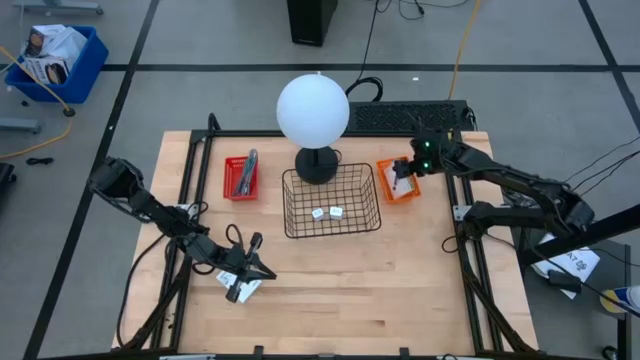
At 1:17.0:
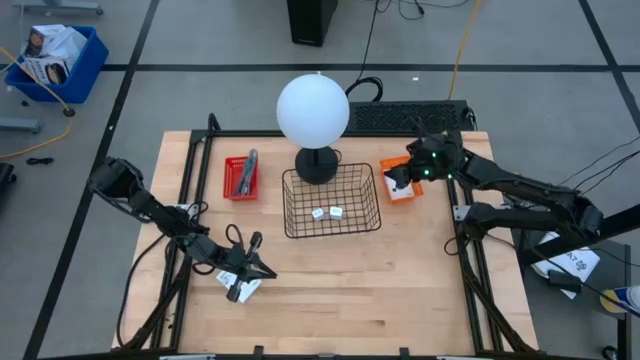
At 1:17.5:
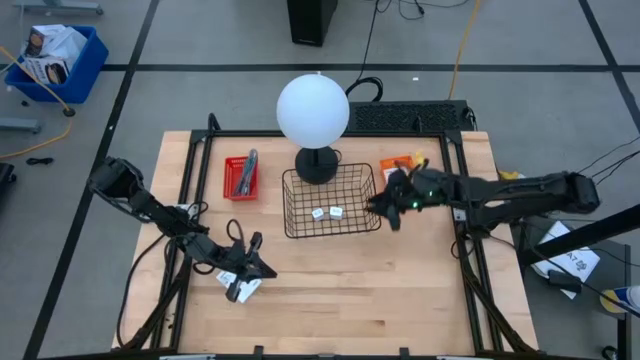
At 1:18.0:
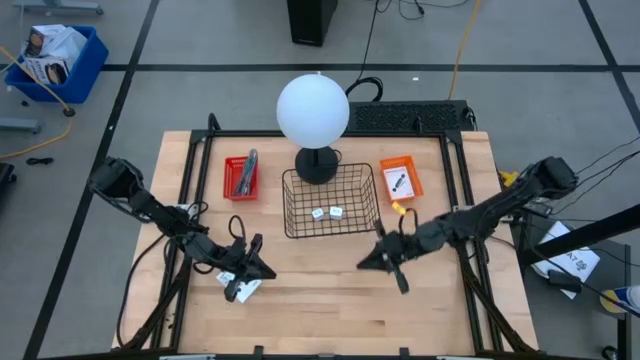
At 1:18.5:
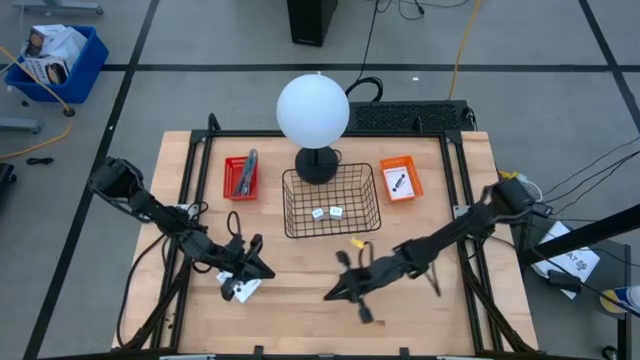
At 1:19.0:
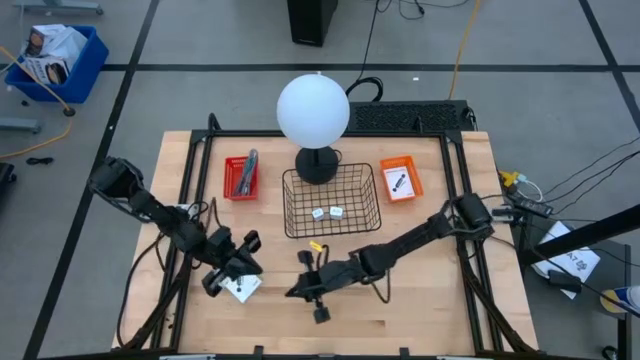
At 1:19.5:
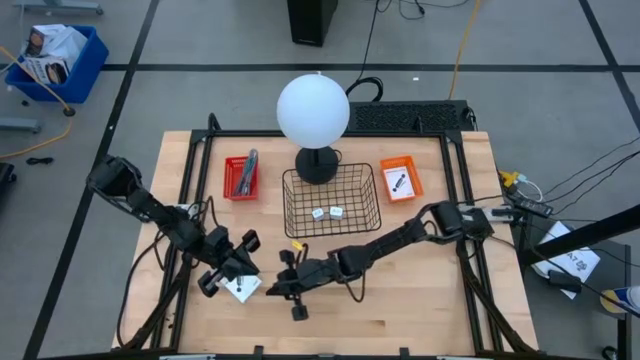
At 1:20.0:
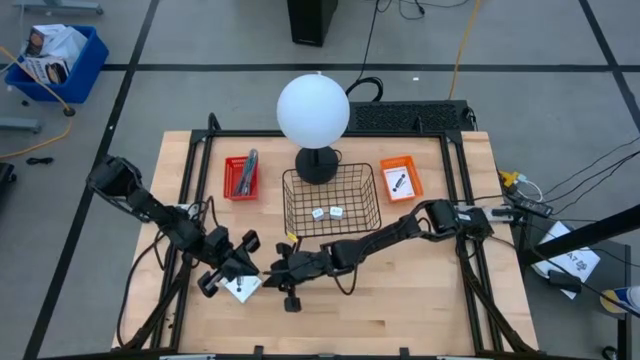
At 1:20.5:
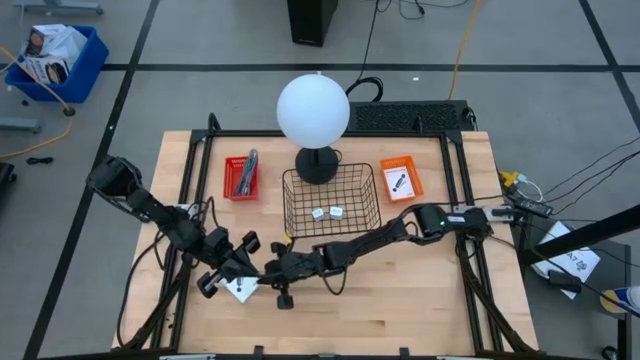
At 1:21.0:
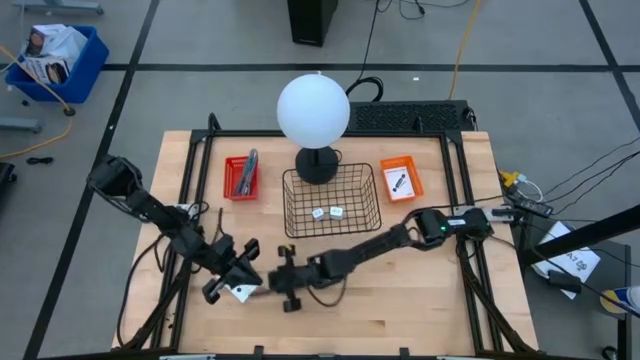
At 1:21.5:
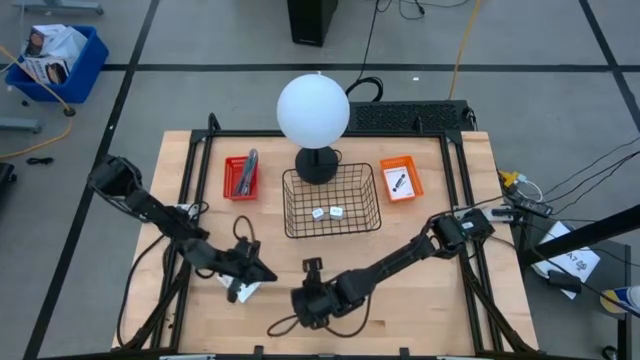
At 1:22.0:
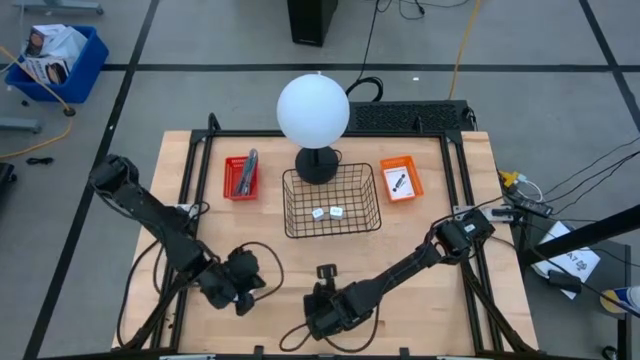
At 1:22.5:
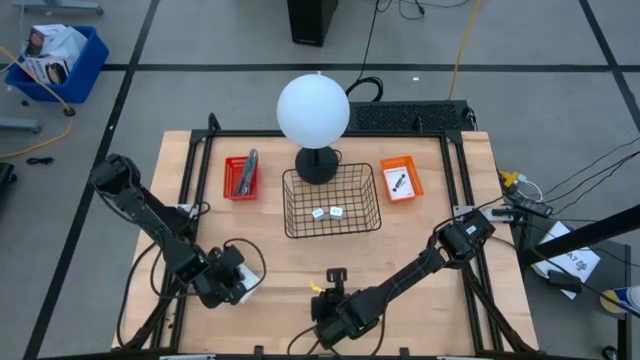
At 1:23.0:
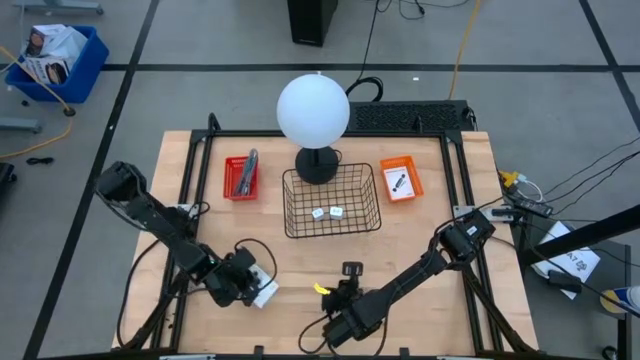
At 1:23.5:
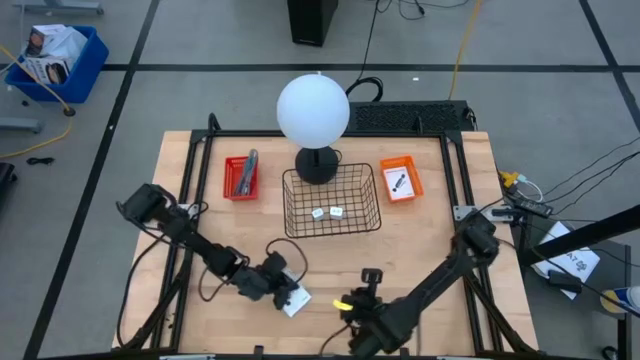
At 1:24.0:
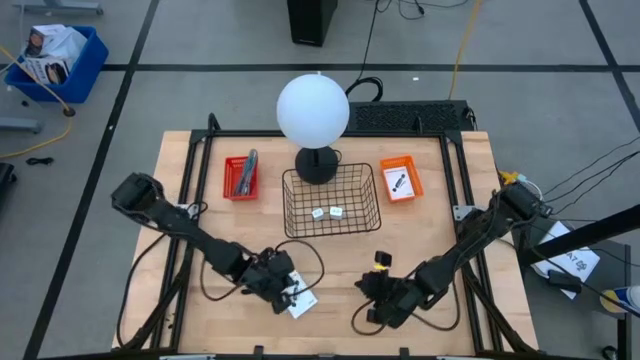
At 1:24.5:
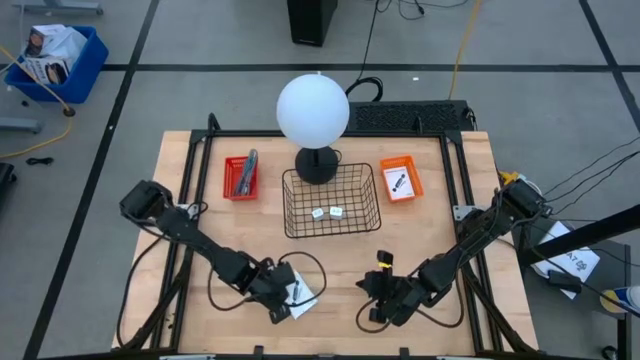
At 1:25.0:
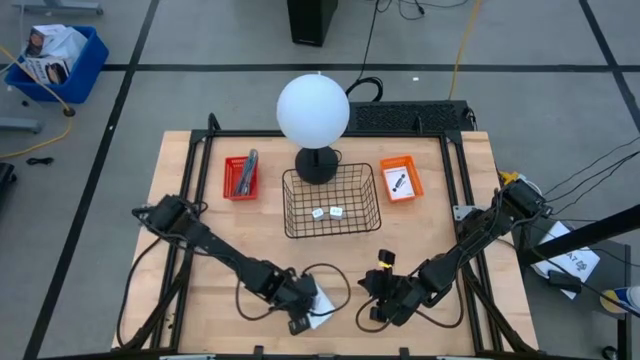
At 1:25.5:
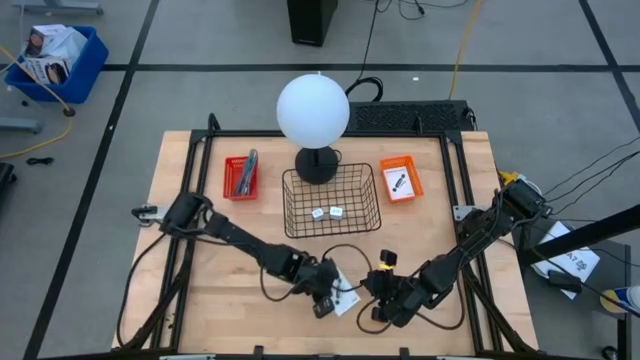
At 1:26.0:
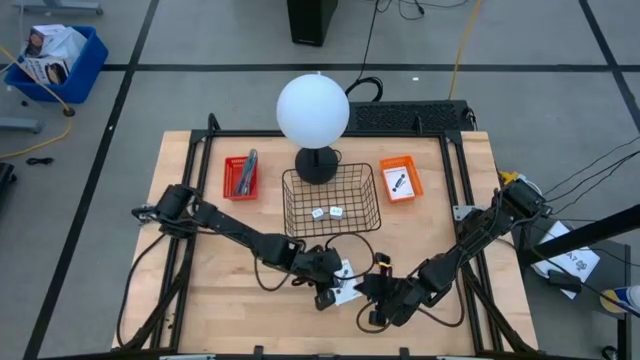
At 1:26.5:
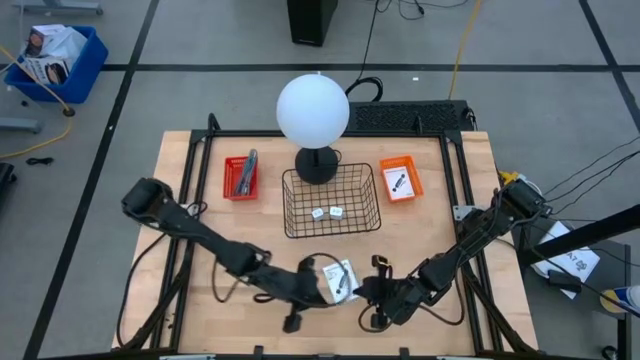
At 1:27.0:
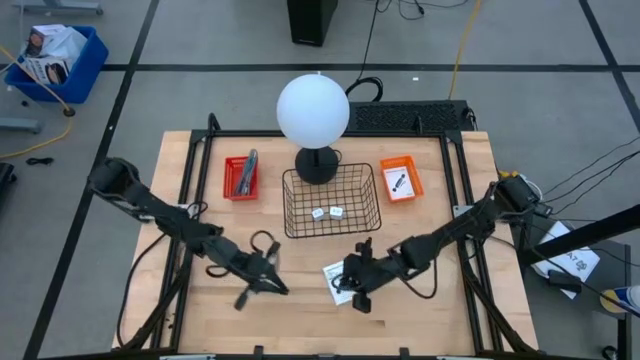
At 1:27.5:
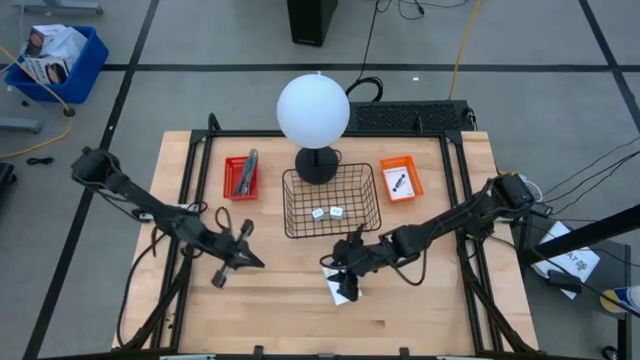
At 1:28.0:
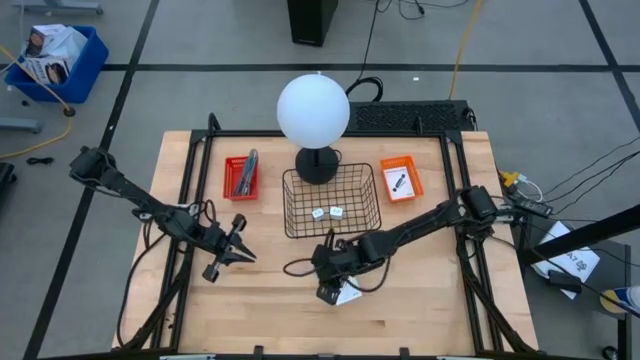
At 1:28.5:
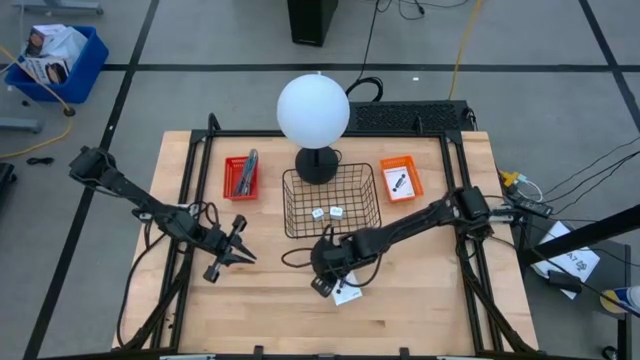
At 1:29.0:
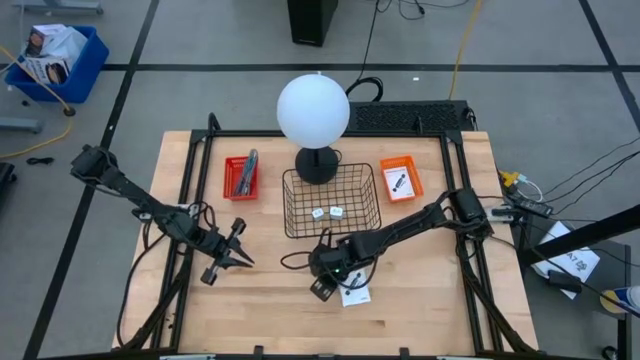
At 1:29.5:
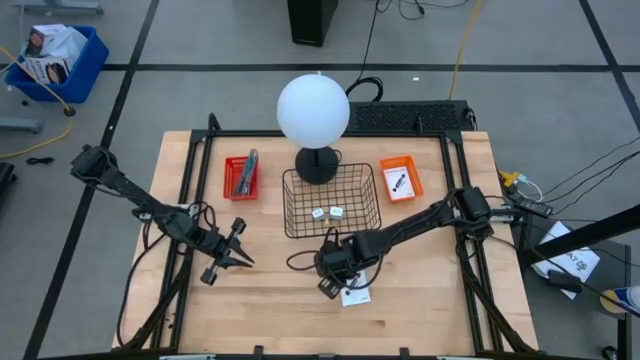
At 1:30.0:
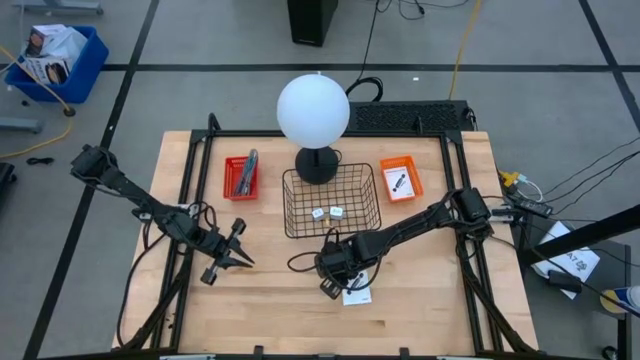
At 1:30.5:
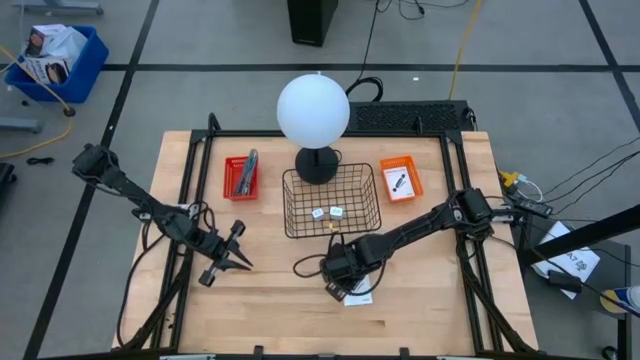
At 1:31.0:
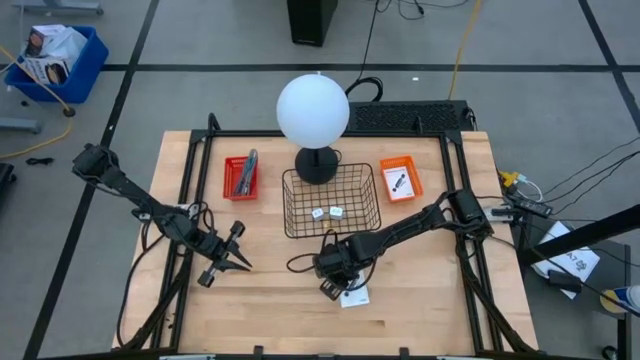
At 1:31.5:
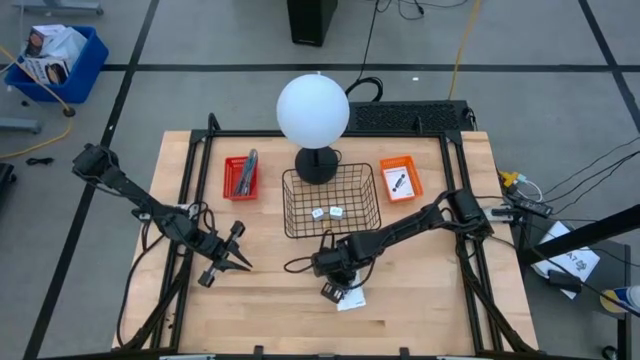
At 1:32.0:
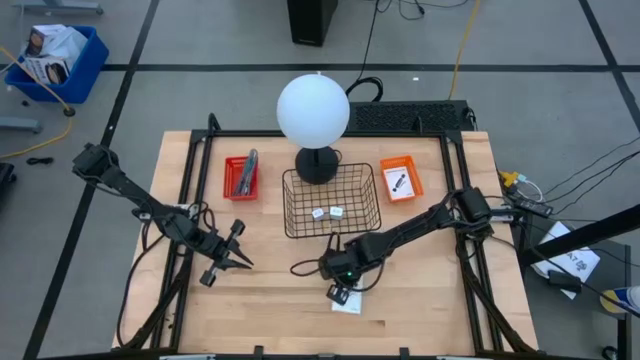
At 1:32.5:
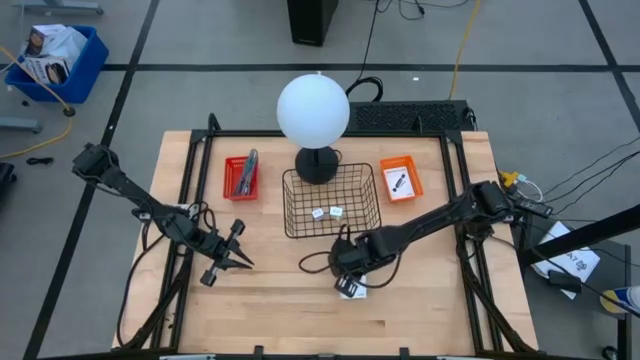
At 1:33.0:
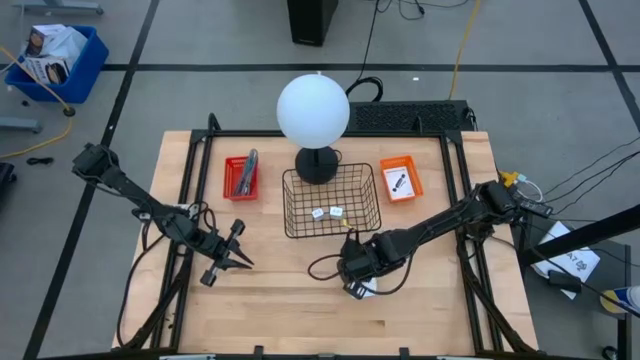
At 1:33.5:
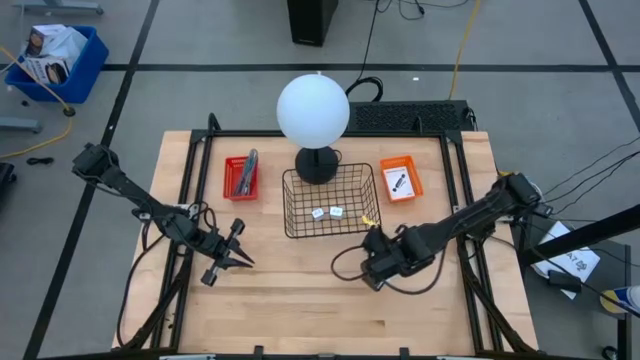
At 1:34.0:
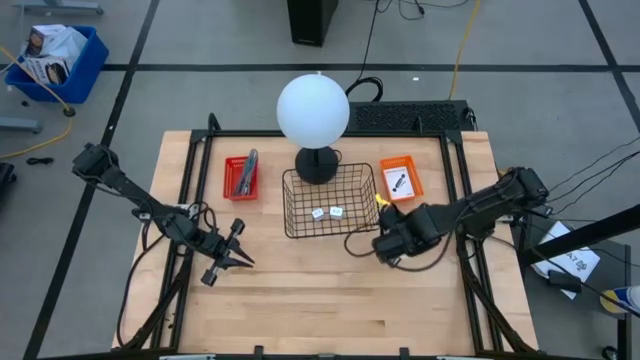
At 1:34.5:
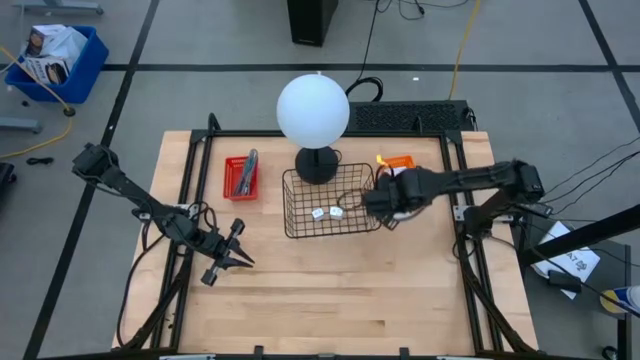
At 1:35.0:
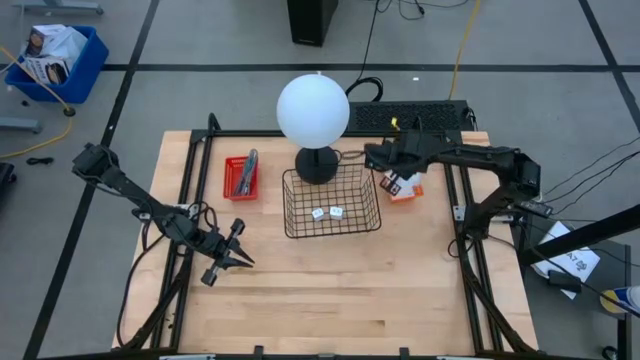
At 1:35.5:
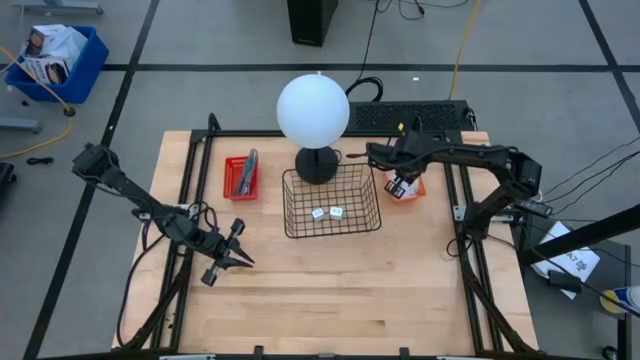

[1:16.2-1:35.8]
Task: Pick and place items into bin
Put the card reader box into the orange bin

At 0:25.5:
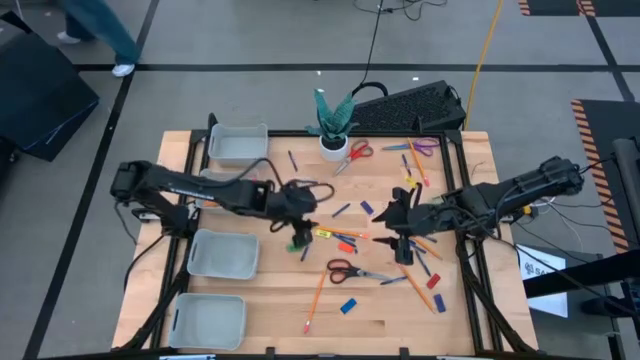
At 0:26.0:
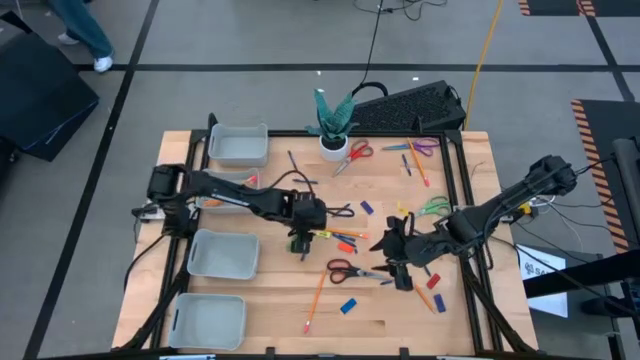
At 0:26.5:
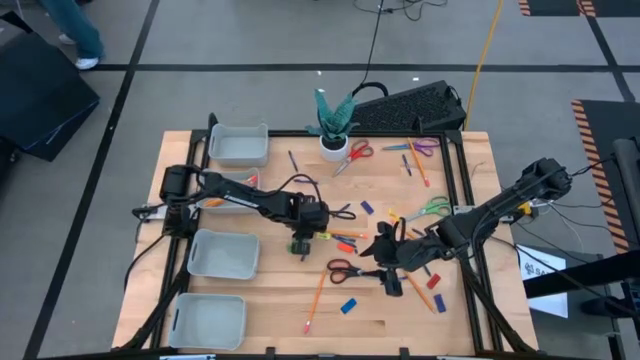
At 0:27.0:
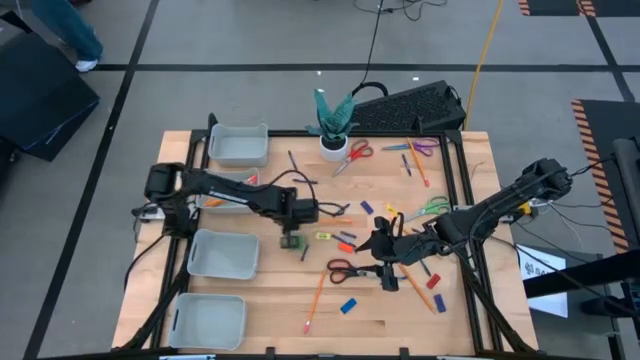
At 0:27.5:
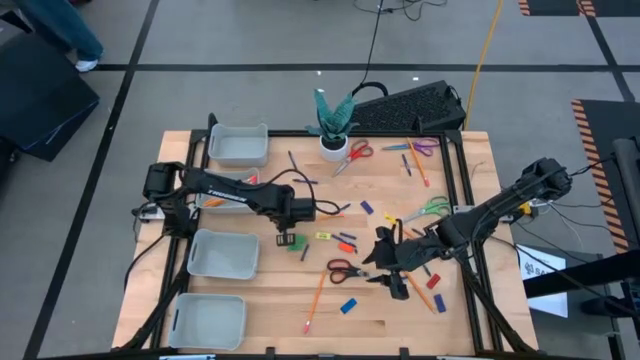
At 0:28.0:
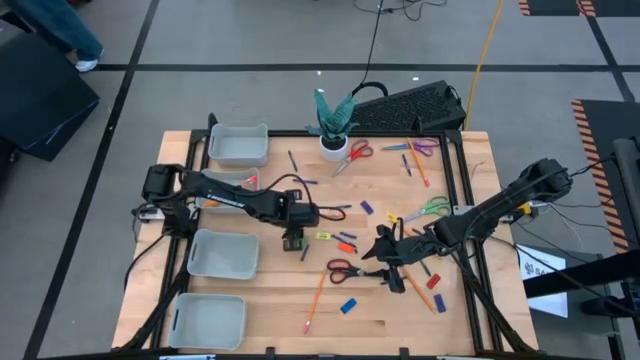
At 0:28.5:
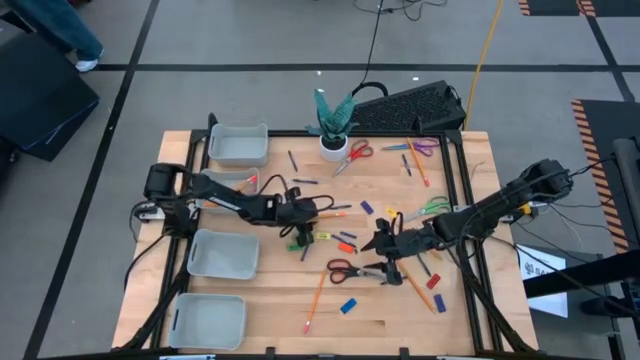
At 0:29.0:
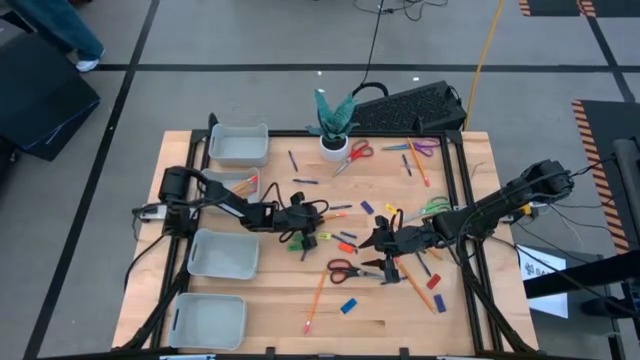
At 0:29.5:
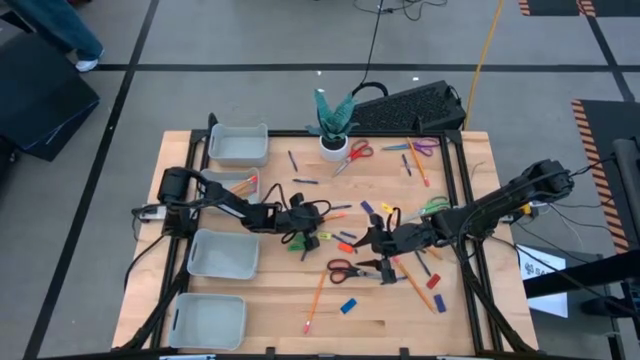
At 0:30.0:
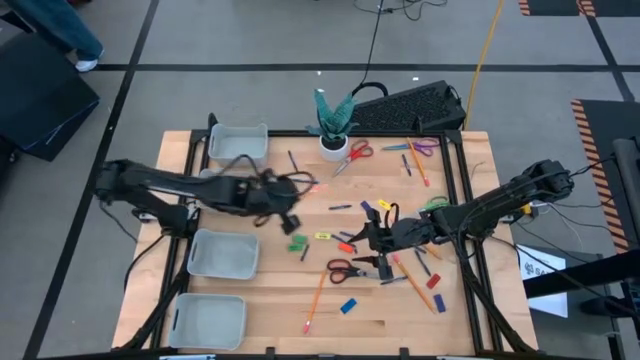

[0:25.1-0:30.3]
Task: Sort crayons/erasers/pens/pencils in bins
Put the orange pencil into the middle top gray bin
